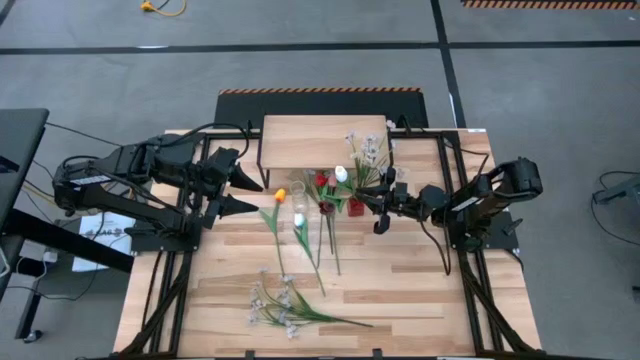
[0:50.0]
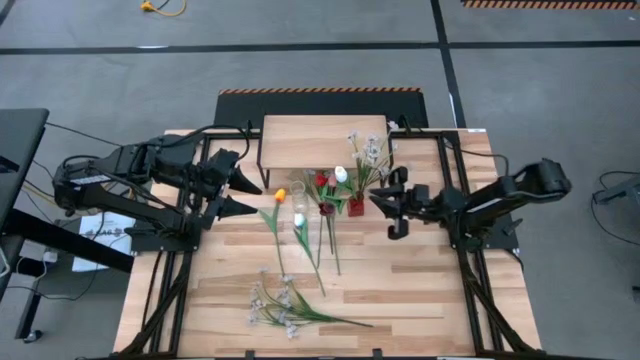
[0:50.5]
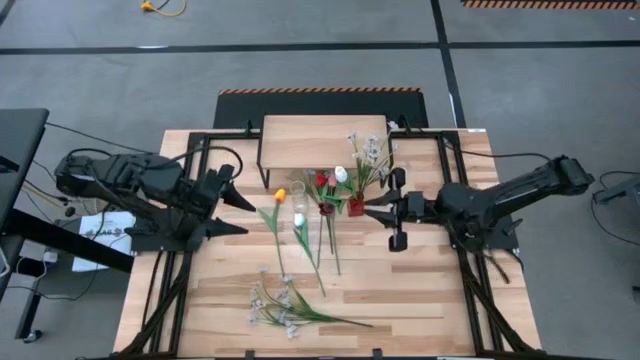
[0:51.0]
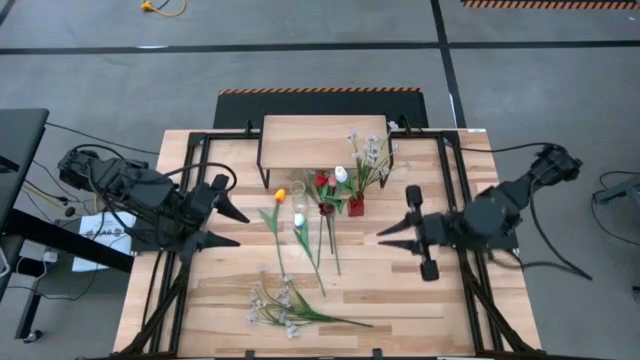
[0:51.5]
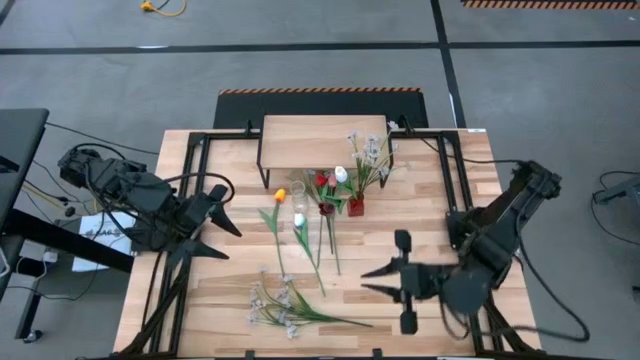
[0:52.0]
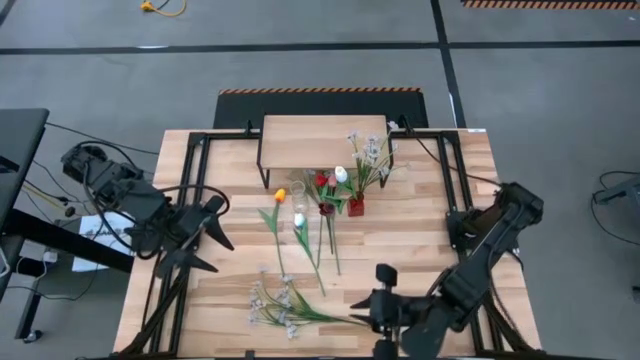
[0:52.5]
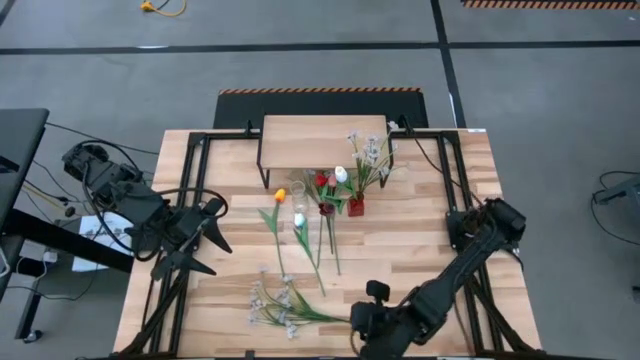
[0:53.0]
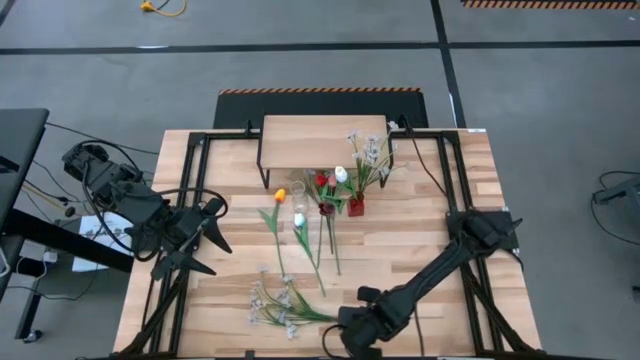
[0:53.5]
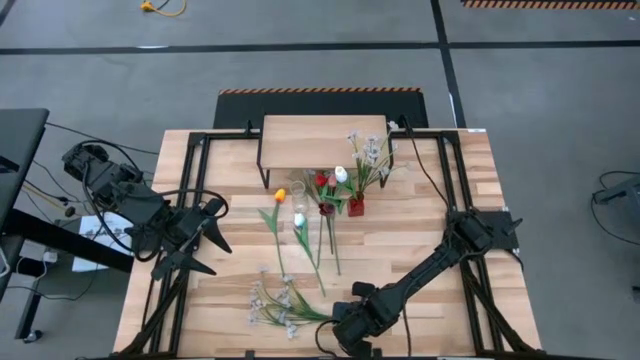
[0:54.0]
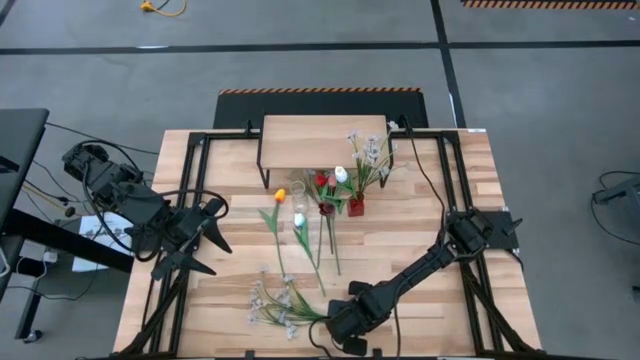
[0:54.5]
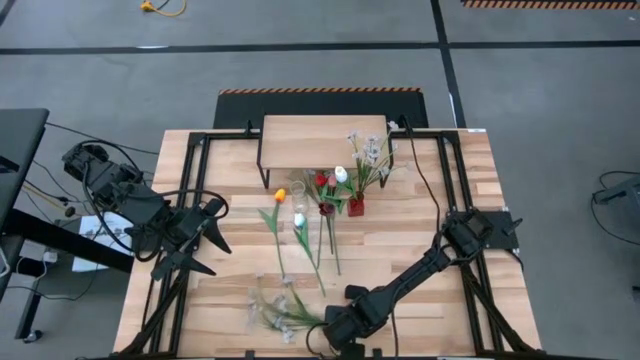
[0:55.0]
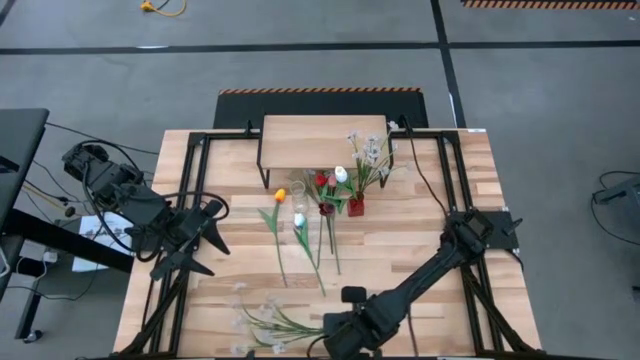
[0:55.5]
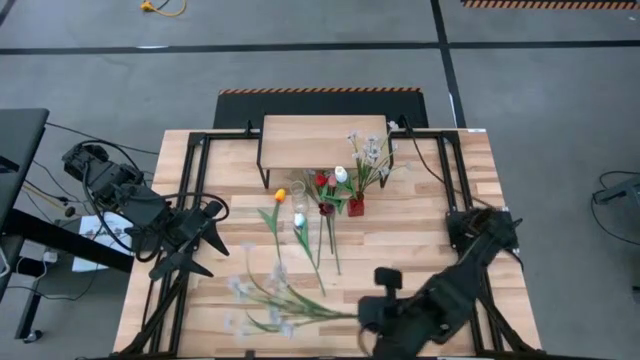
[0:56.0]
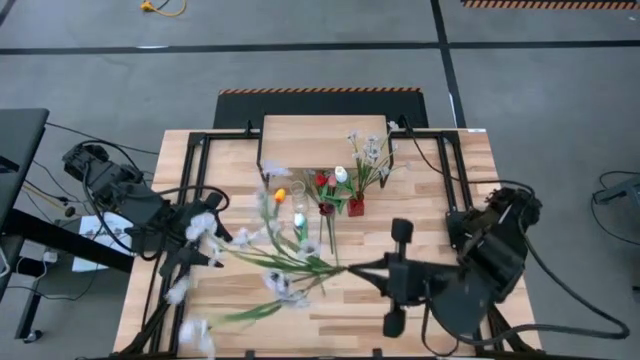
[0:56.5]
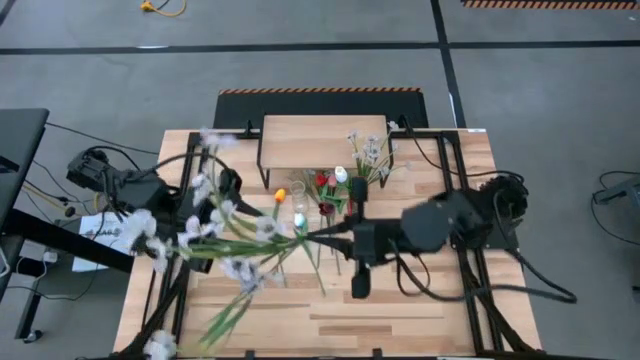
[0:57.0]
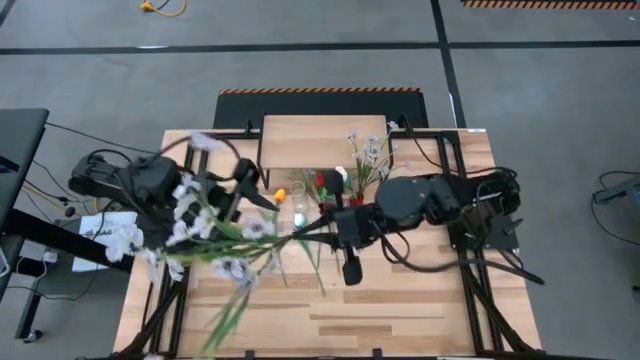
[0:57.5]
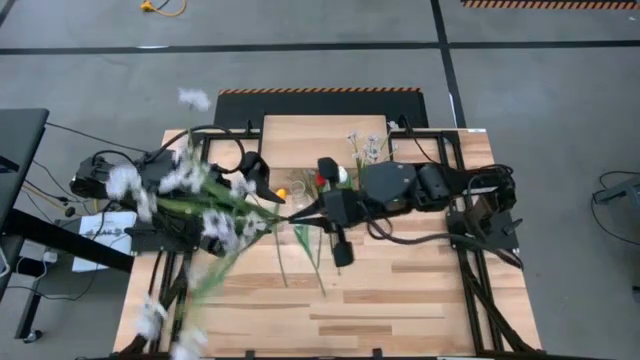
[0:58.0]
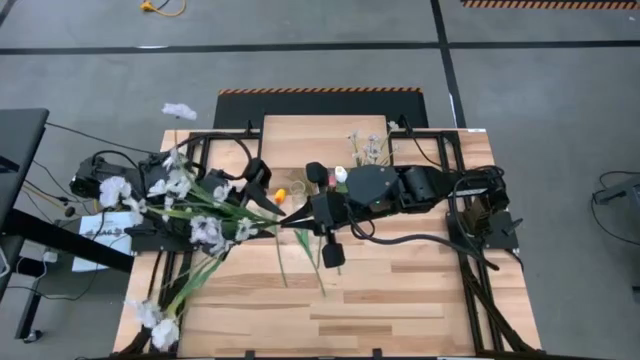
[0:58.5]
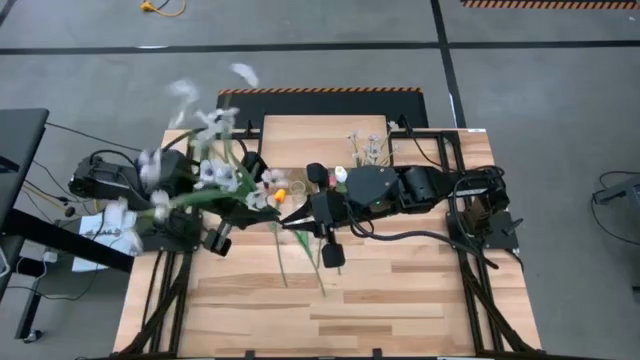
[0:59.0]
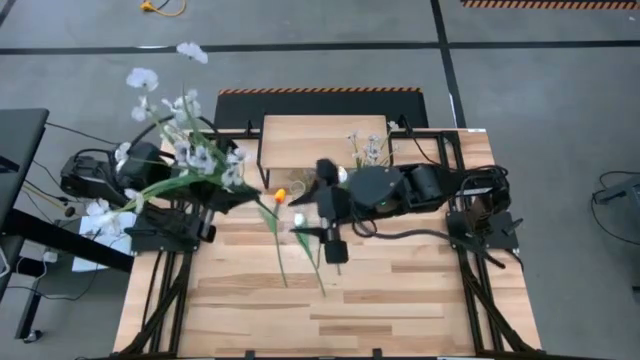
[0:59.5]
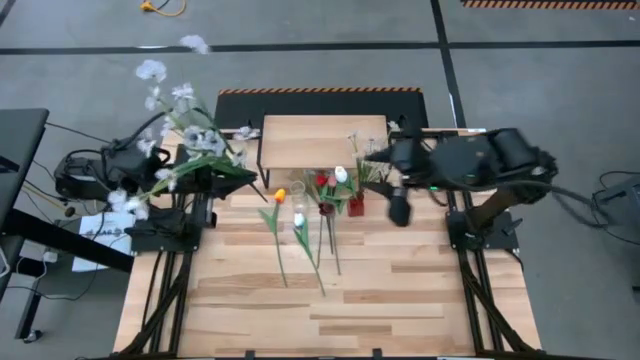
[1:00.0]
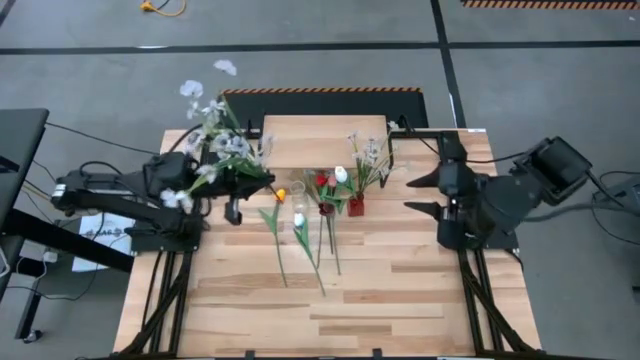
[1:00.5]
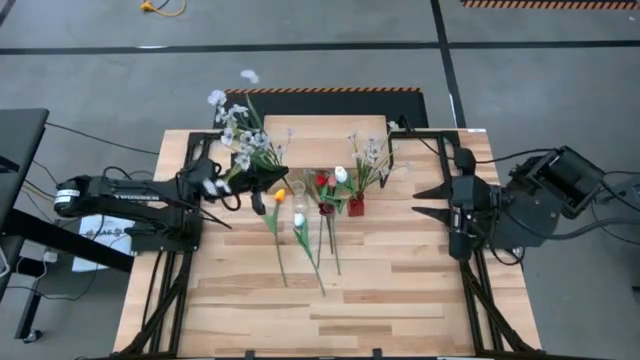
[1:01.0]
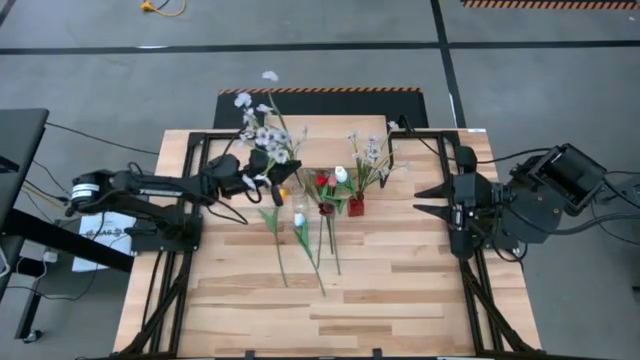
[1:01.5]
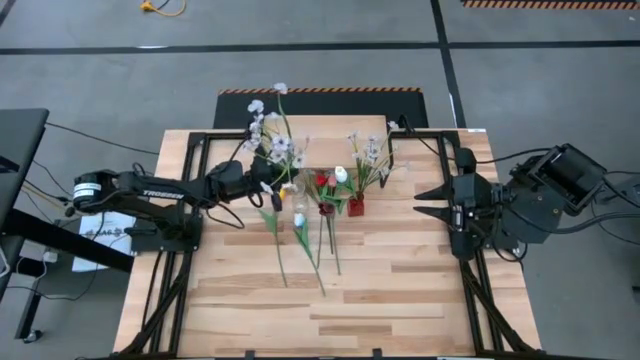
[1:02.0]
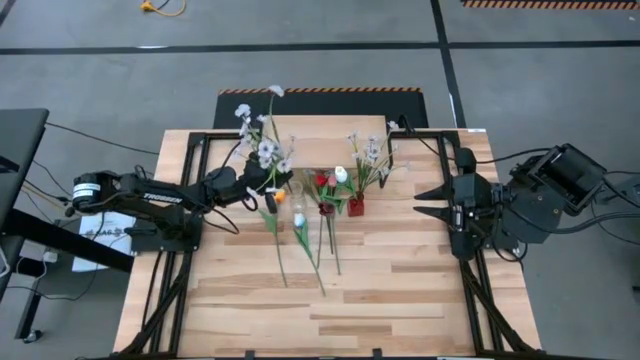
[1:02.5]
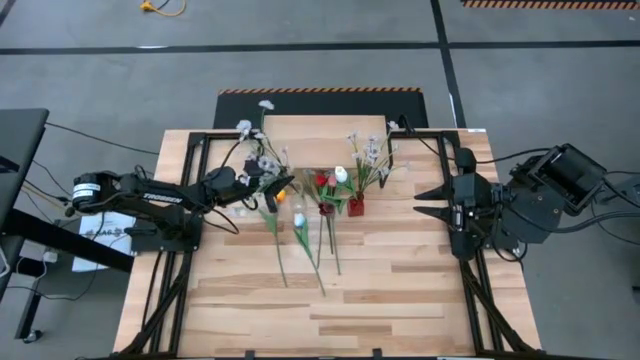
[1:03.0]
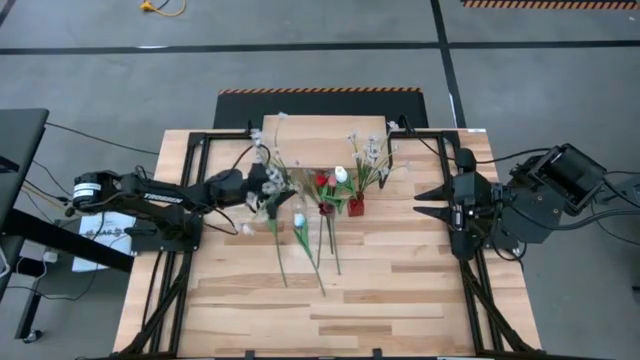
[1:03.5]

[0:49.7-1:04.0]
Task: Pick and place flowers into a vace then onto a shelf
Put the bottom white flower into the transparent vase
